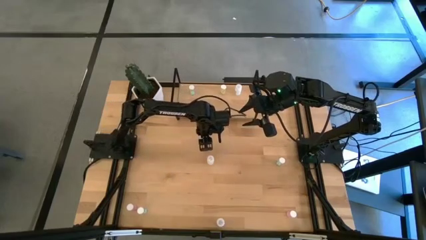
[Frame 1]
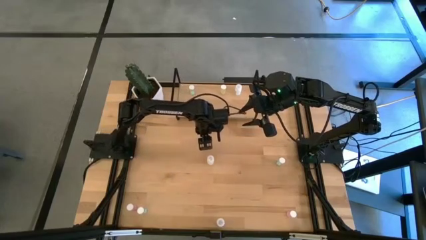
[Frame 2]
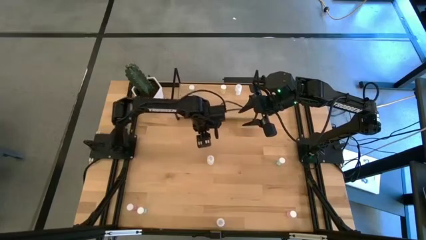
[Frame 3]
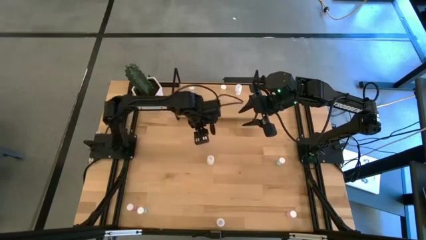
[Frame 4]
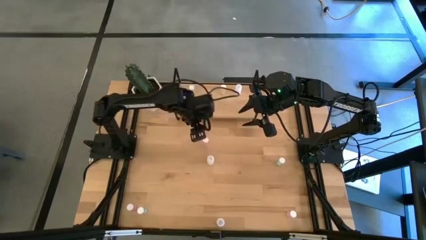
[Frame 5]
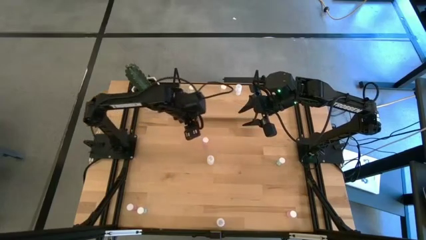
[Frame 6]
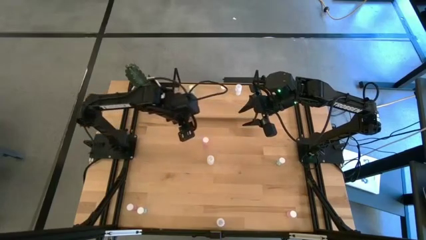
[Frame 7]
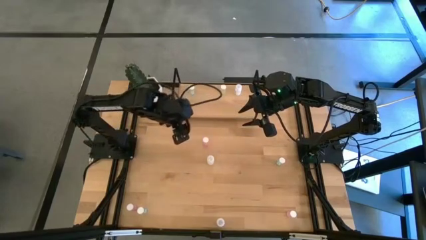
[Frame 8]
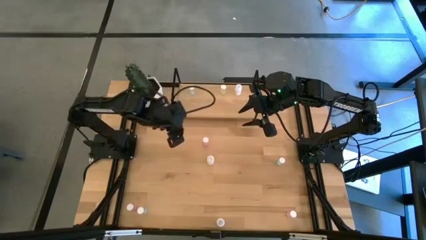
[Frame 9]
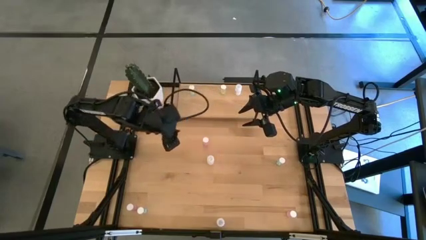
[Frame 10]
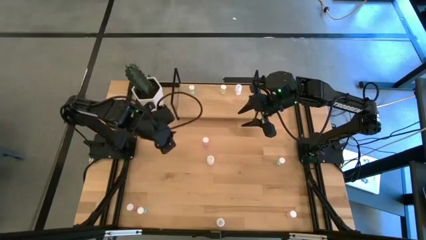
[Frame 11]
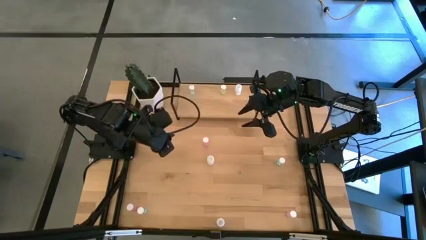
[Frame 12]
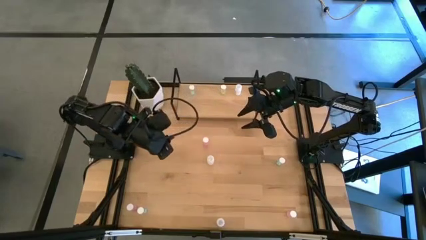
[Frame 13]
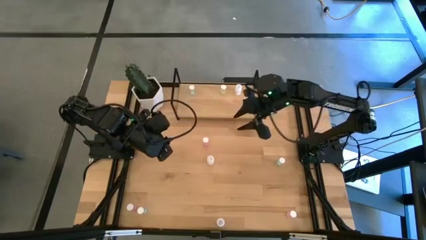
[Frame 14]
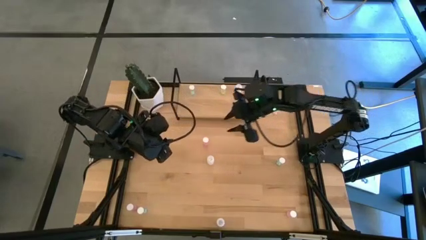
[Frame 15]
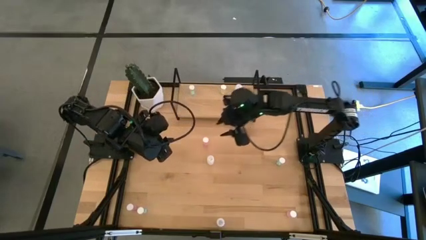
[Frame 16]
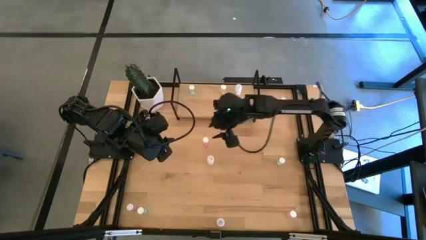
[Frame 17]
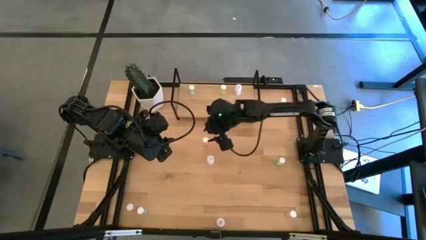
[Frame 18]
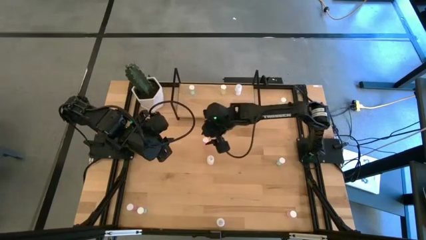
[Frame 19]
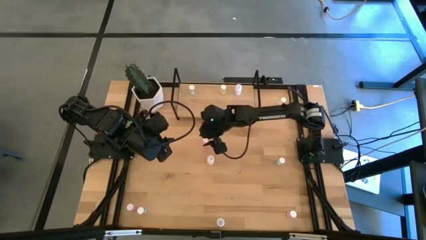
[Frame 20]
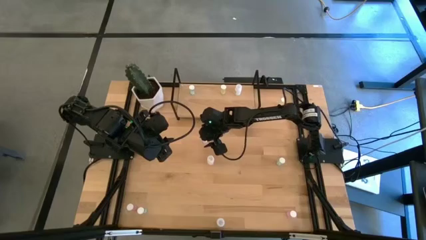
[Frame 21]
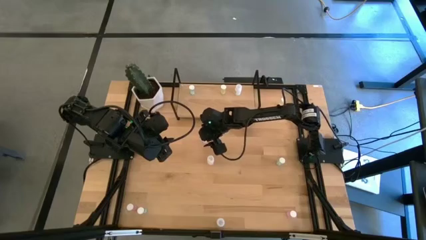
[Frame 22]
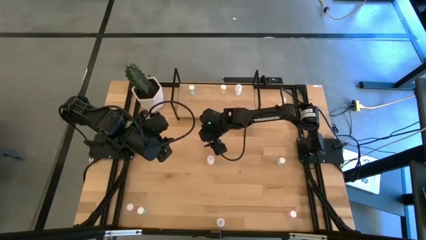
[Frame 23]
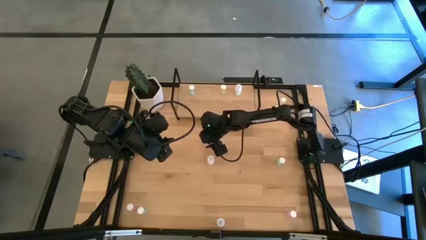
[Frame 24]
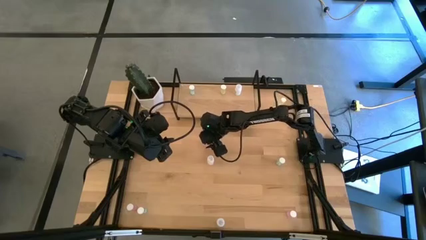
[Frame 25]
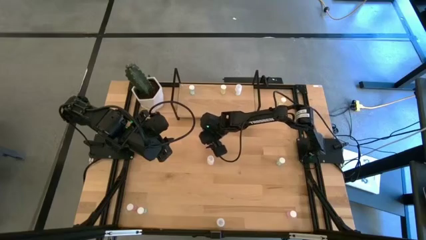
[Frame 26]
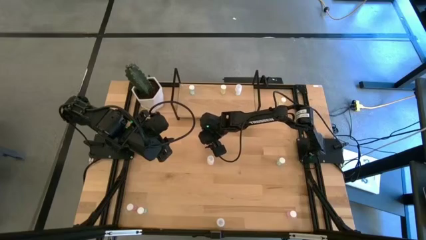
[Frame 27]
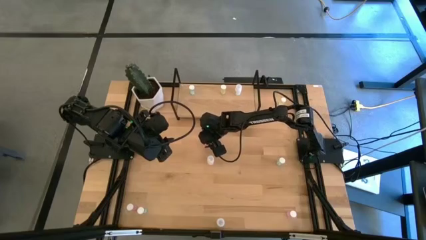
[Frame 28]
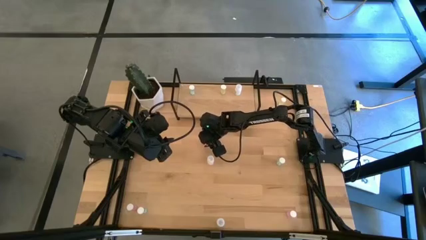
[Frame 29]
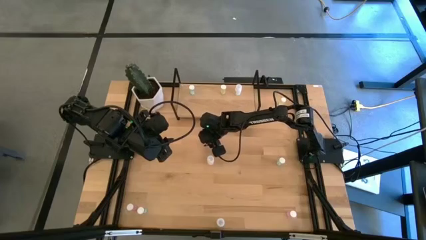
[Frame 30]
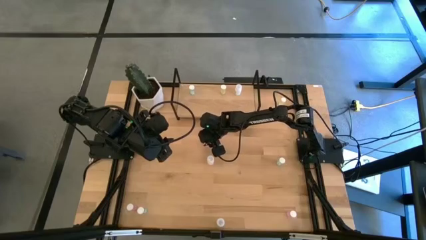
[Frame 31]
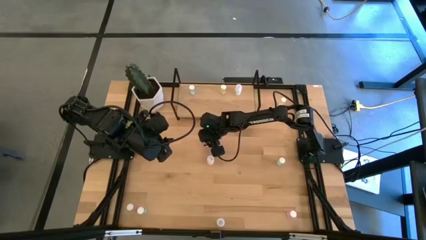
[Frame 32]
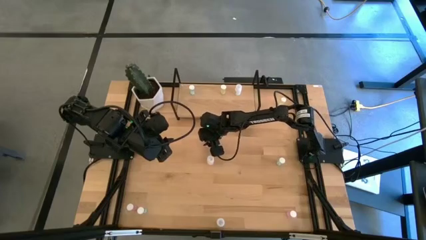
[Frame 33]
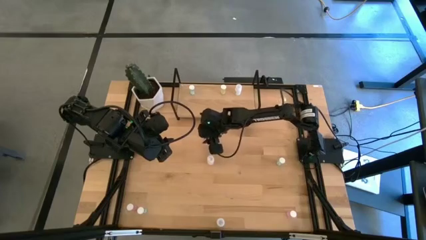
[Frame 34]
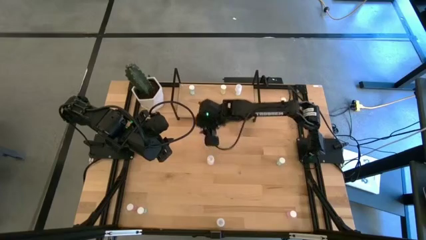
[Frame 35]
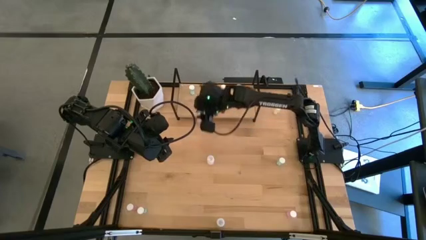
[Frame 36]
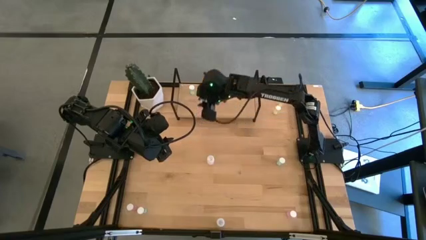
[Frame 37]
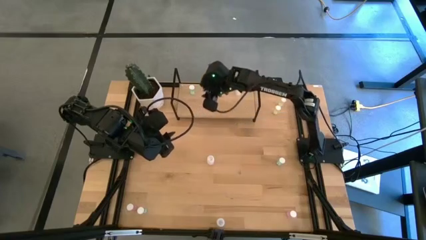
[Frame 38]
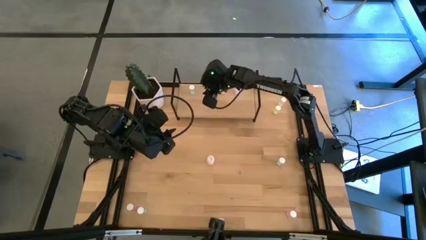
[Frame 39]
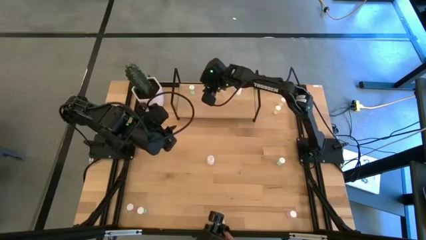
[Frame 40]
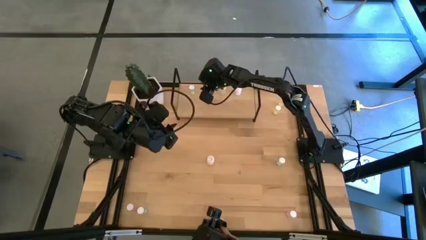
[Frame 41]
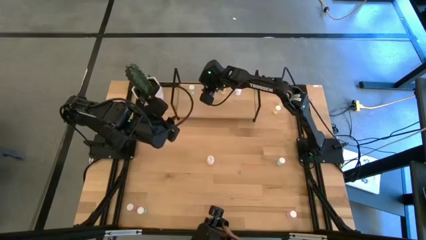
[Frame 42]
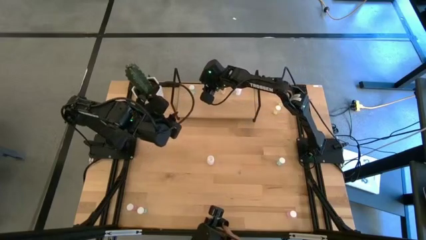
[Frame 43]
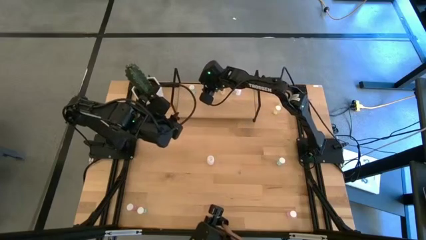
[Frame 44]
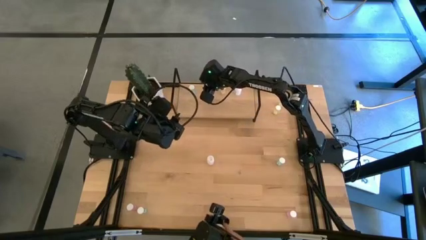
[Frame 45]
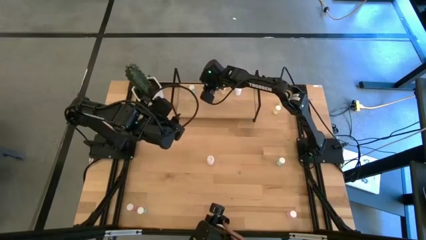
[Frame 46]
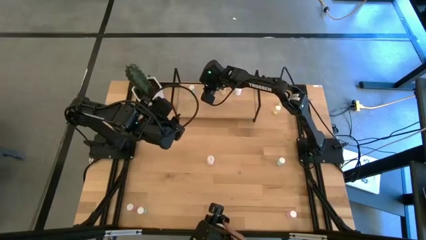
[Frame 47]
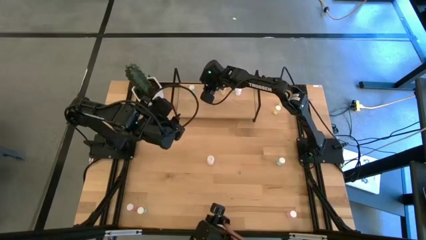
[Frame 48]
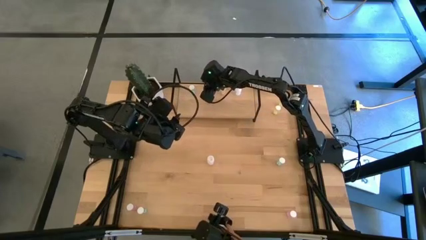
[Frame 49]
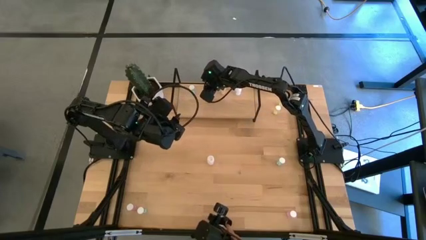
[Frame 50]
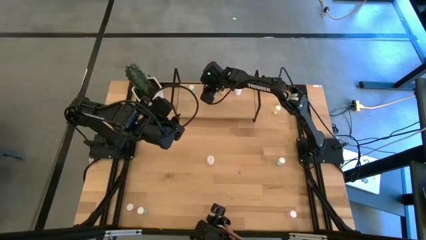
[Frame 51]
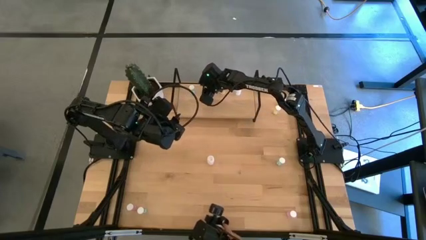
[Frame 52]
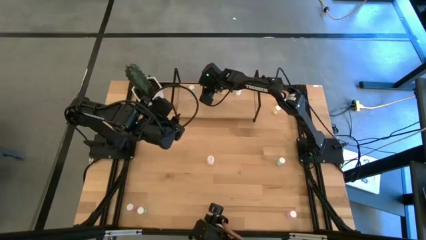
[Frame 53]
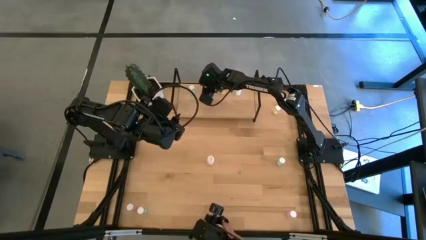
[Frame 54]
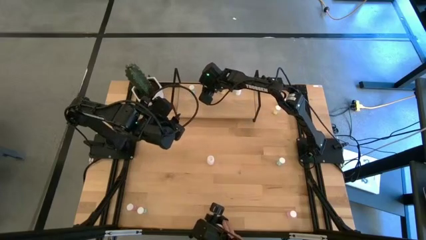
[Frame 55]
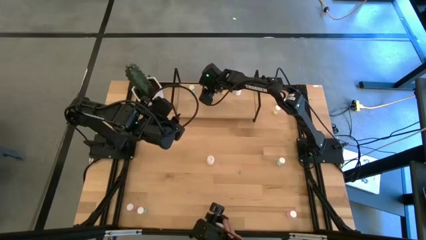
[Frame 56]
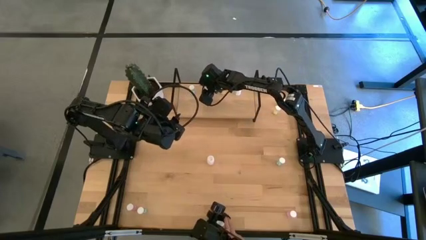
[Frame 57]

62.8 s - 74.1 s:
Task: Pick and place medicine bottles onto shelf by color
Put the top left pink pill bottle on the shelf
